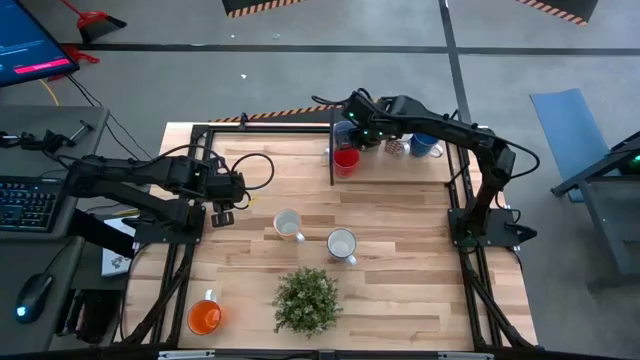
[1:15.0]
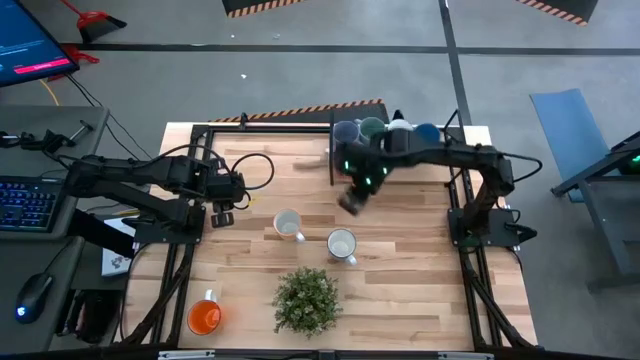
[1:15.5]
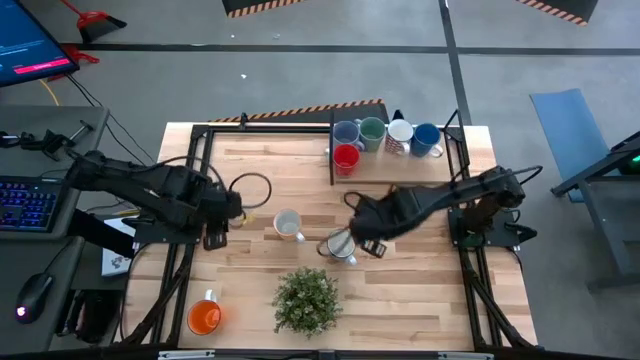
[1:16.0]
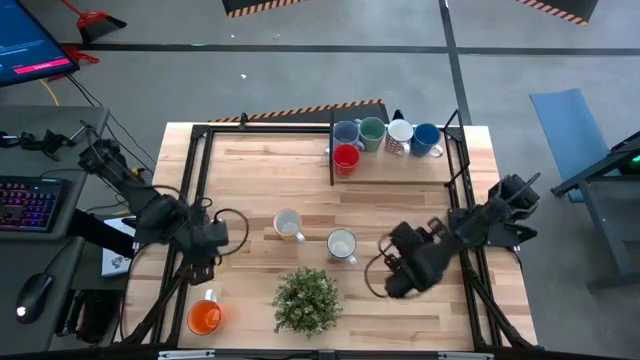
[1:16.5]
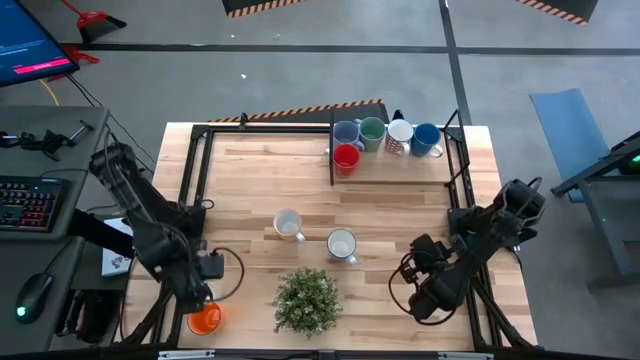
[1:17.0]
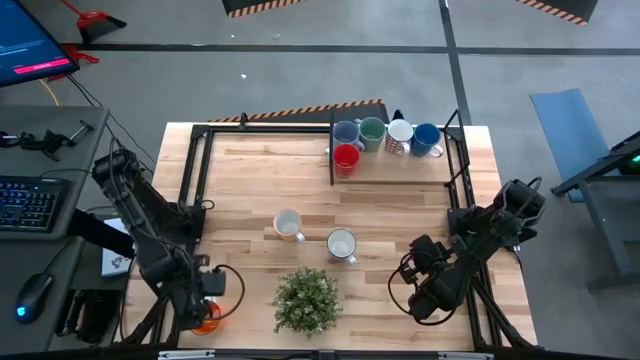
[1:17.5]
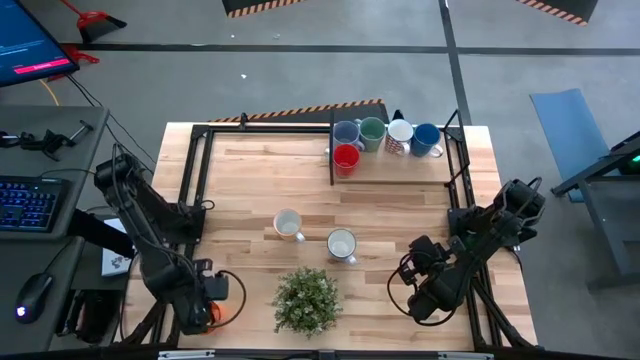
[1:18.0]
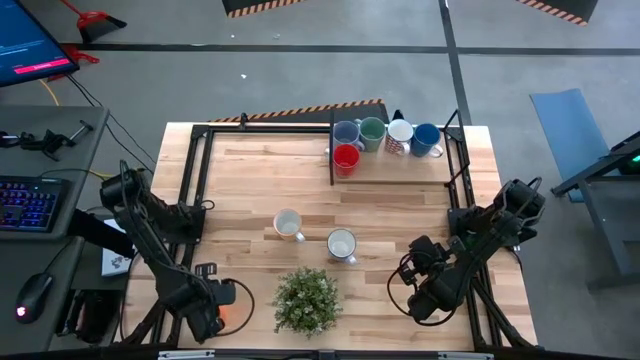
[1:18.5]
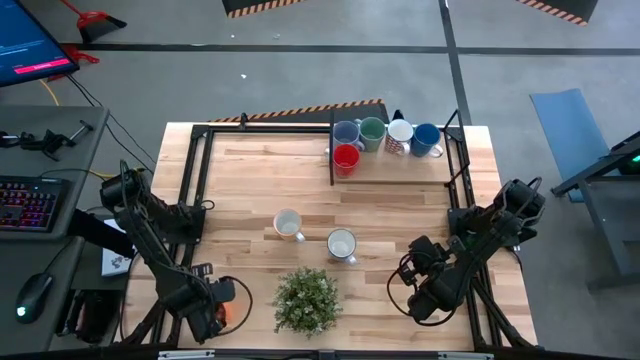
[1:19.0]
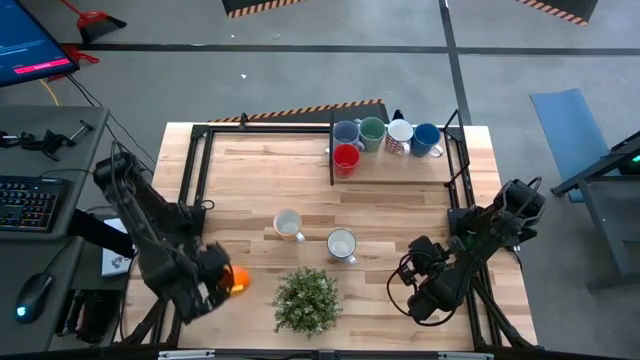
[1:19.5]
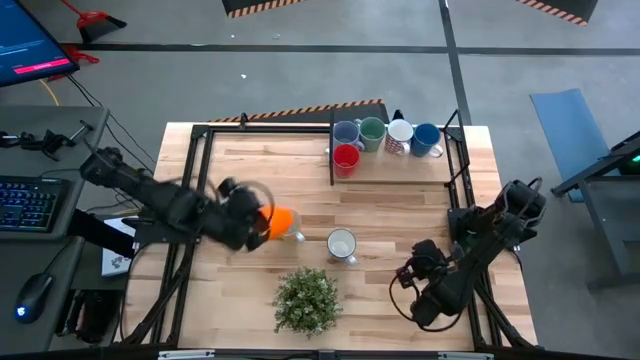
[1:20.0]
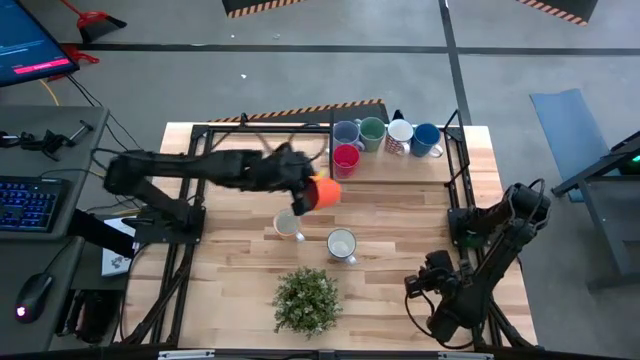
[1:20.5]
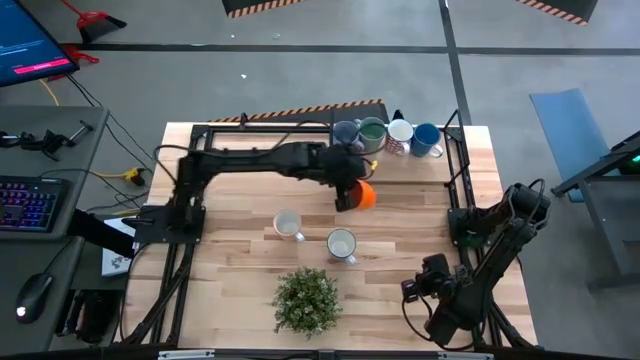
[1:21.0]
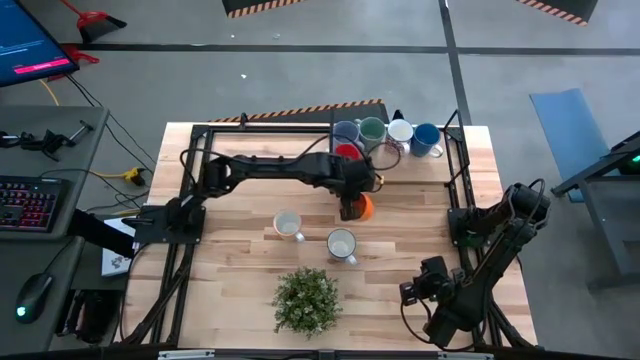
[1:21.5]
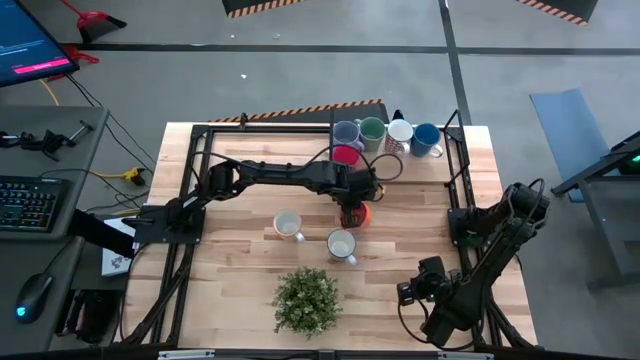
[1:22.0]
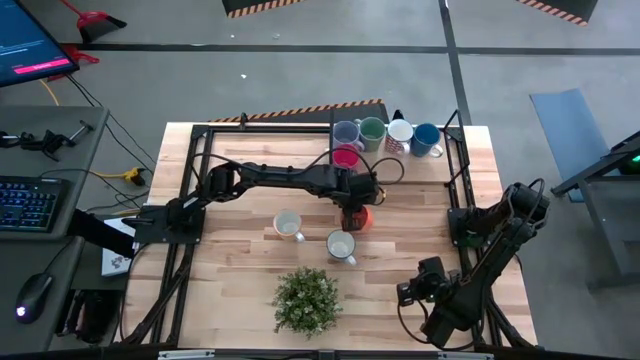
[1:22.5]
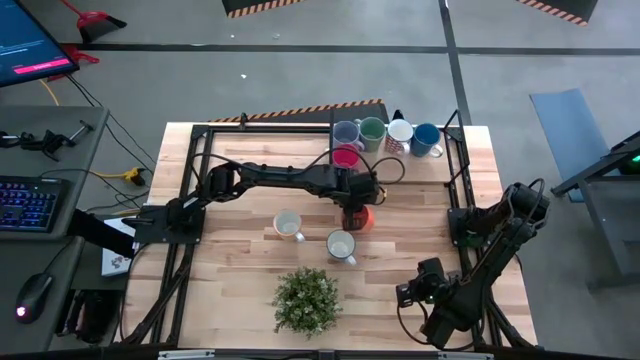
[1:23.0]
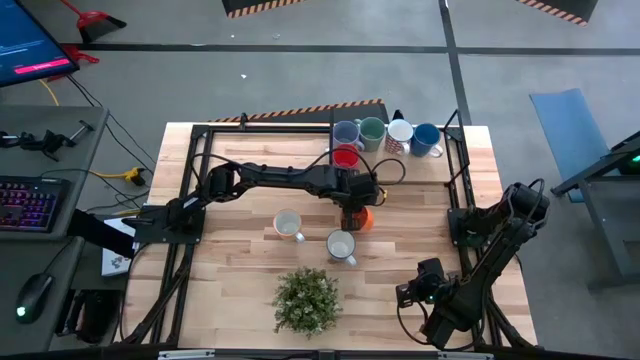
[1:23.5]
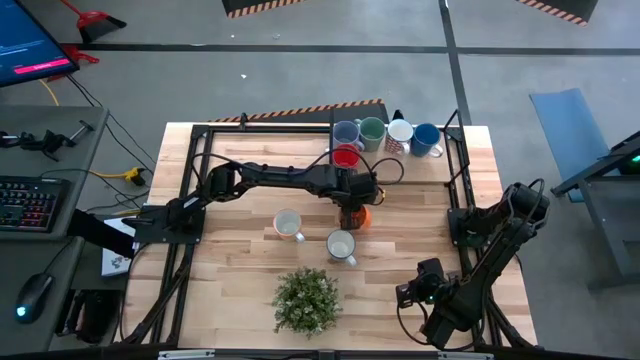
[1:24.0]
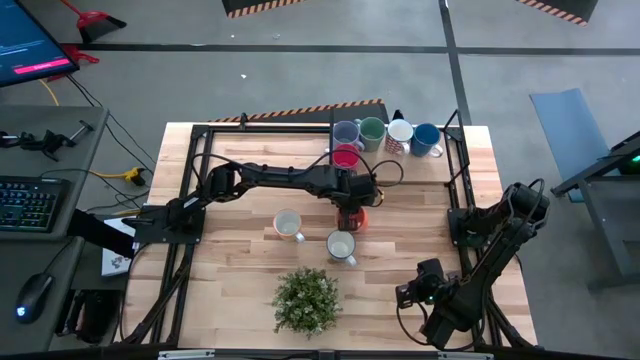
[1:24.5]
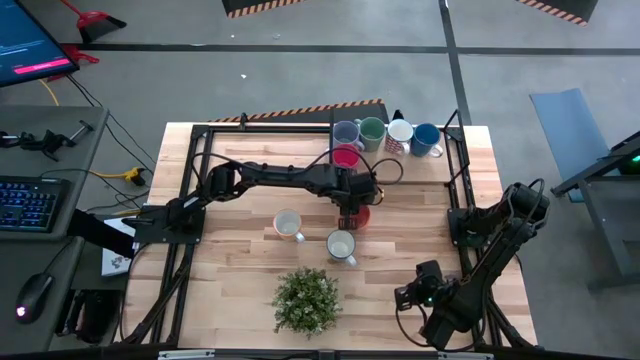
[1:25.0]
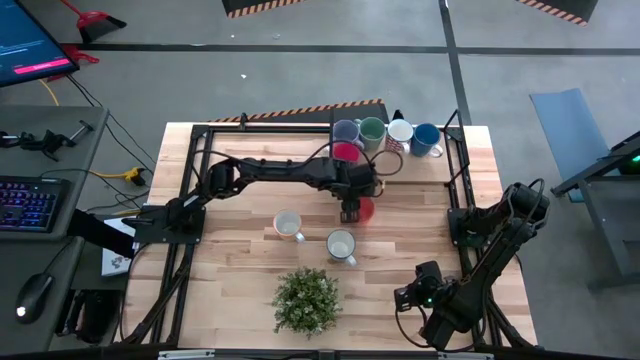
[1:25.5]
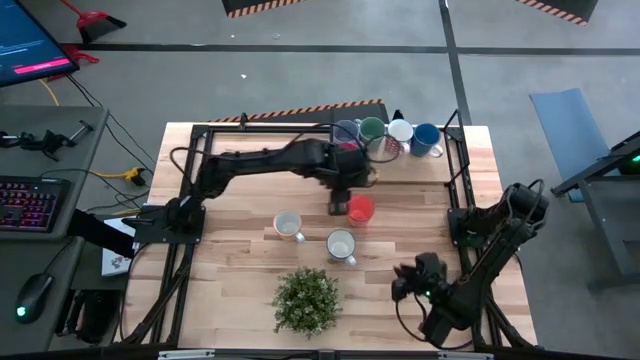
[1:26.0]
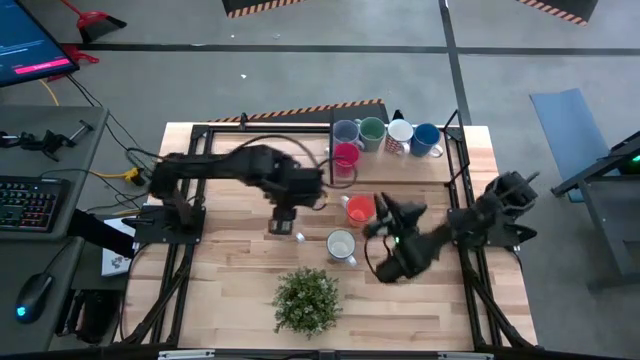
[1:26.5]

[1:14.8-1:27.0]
Task: Place coffee mugs
Put the orange mug on the shelf

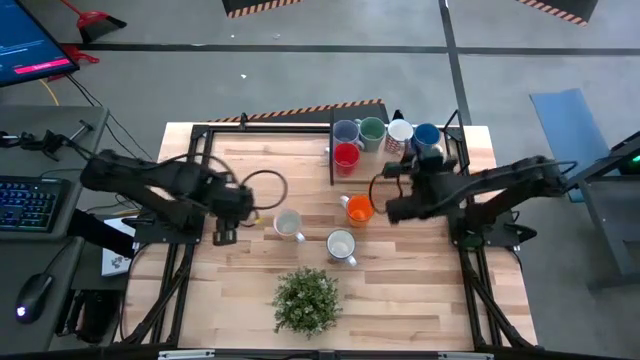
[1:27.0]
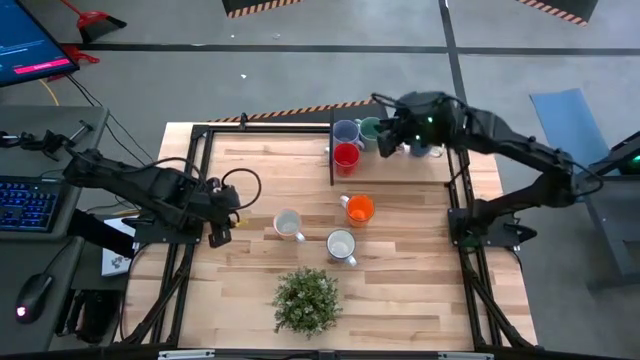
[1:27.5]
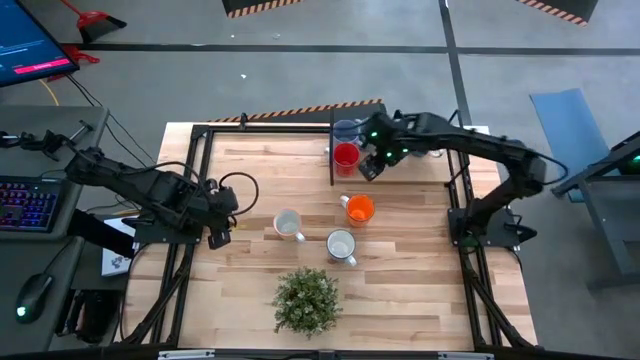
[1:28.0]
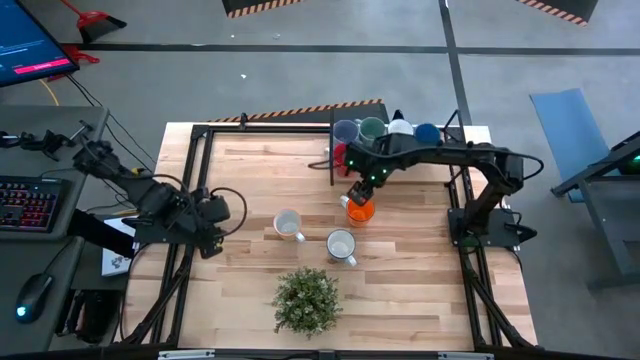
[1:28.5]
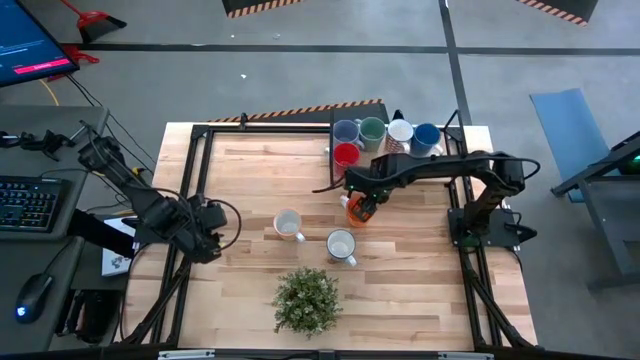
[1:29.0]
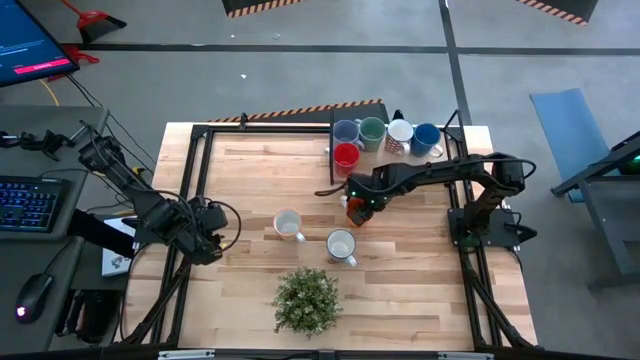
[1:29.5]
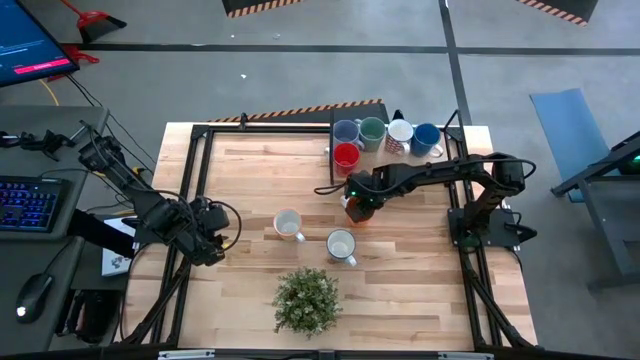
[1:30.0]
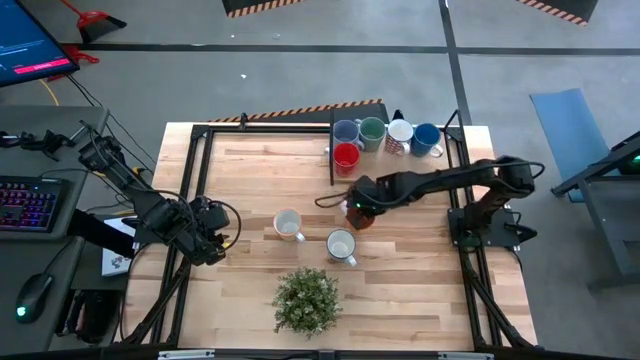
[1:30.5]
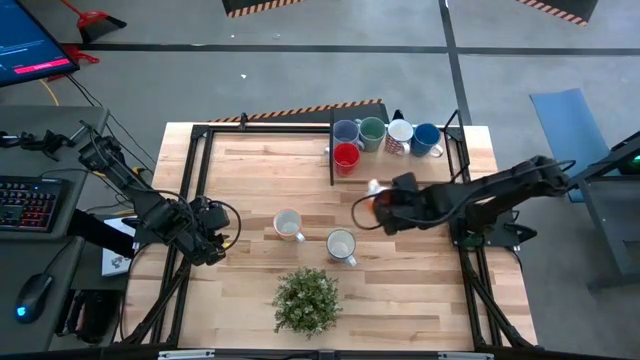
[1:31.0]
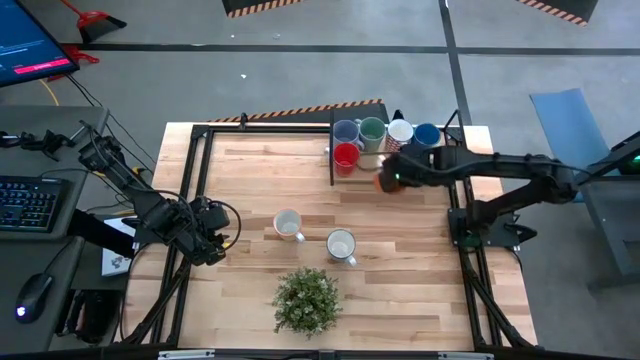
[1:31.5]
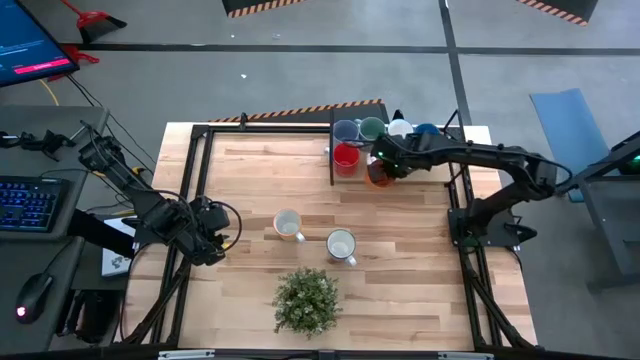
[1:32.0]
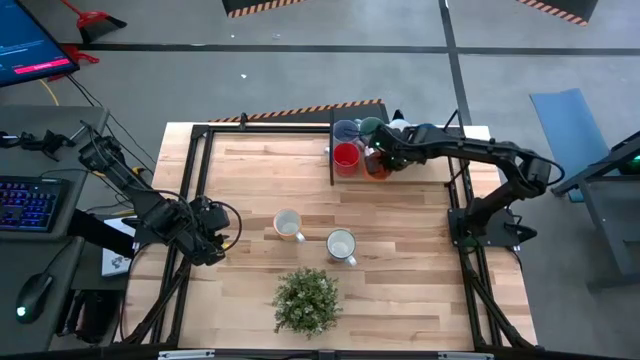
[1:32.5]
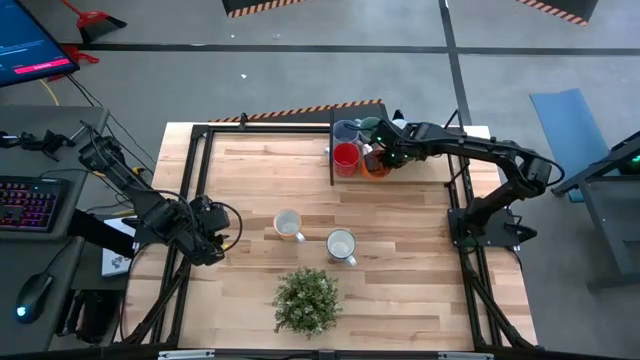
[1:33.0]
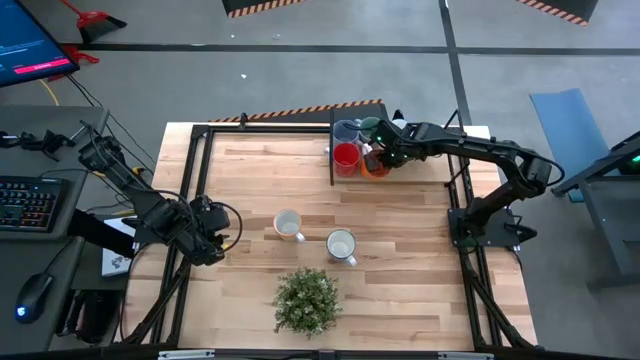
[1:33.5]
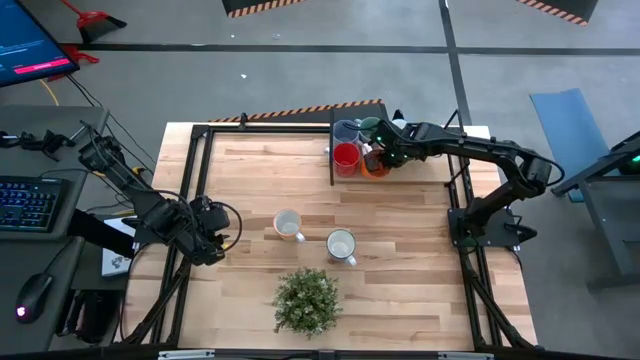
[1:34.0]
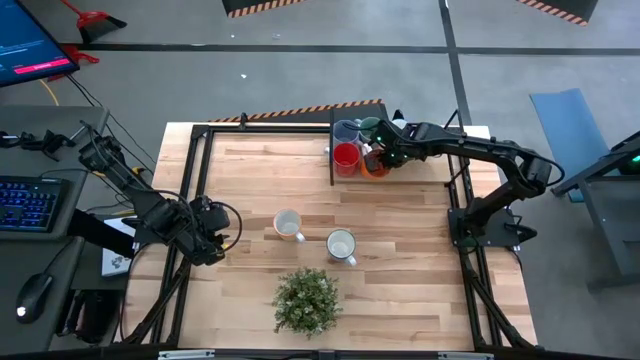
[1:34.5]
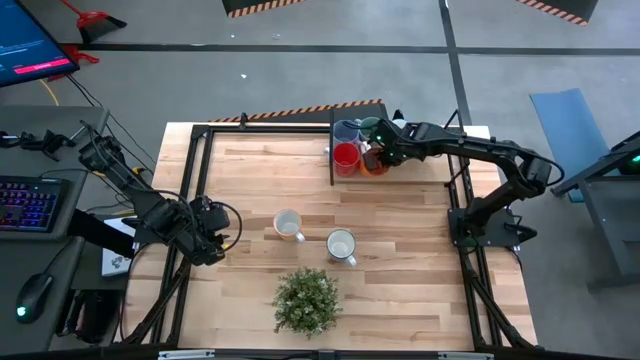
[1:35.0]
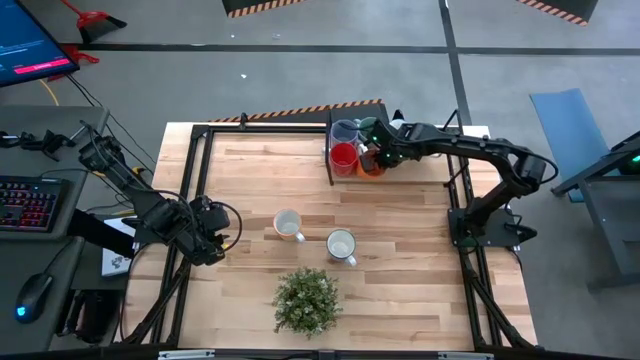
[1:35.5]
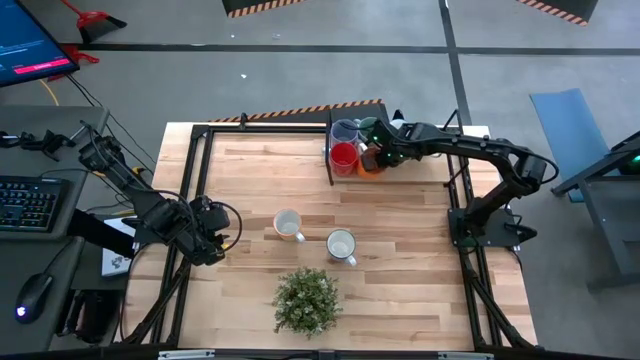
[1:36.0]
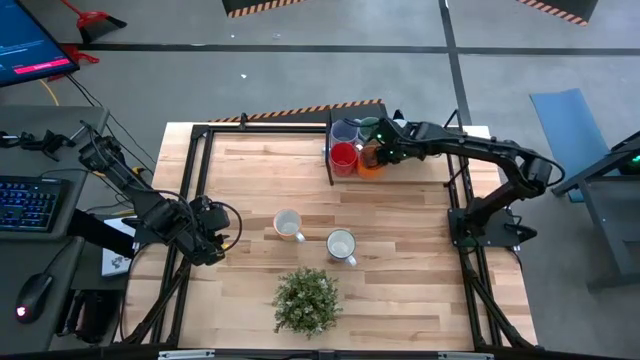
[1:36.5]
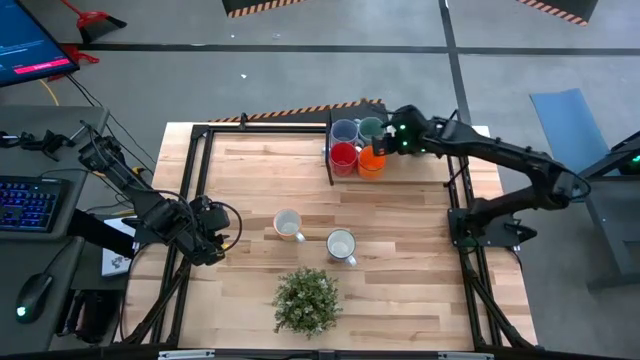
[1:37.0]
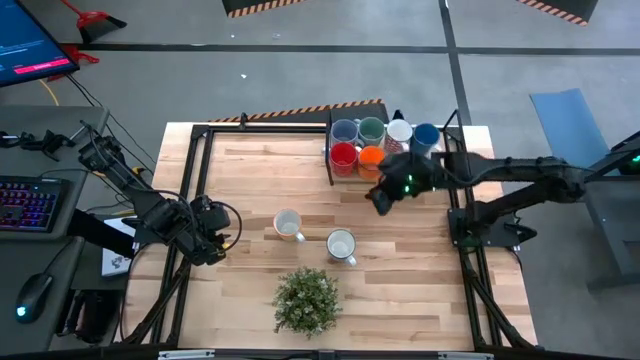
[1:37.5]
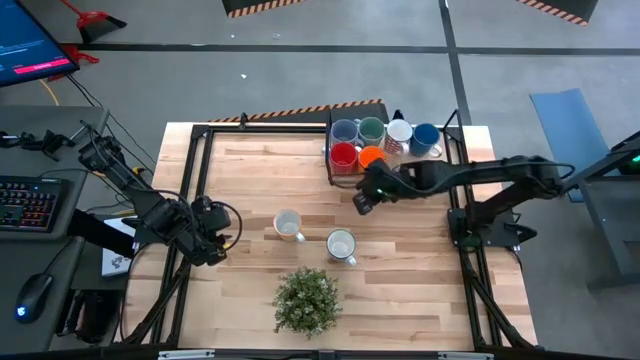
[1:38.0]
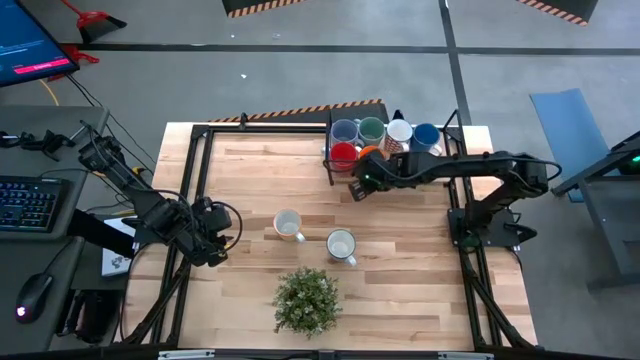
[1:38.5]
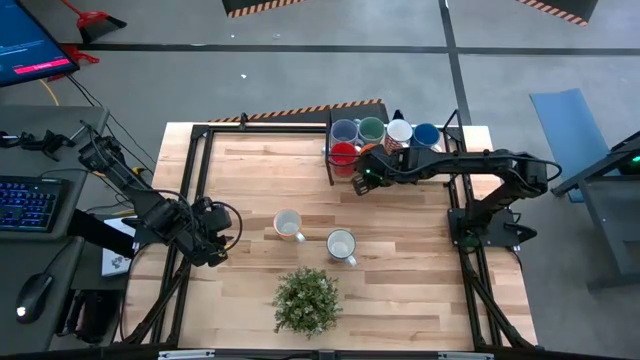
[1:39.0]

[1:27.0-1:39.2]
Put the orange mug on the shelf
